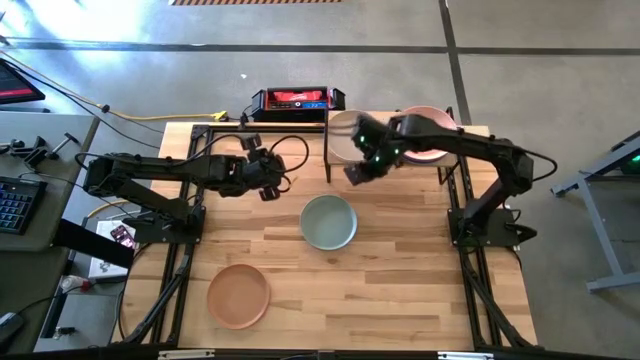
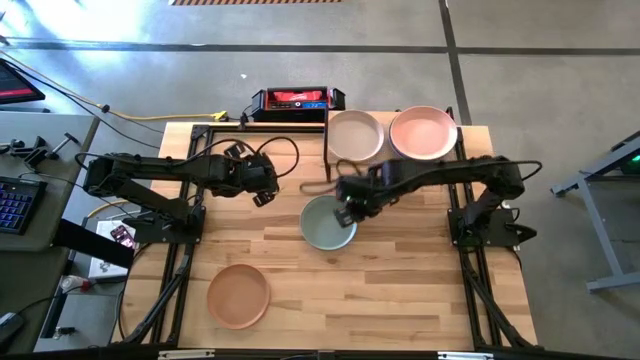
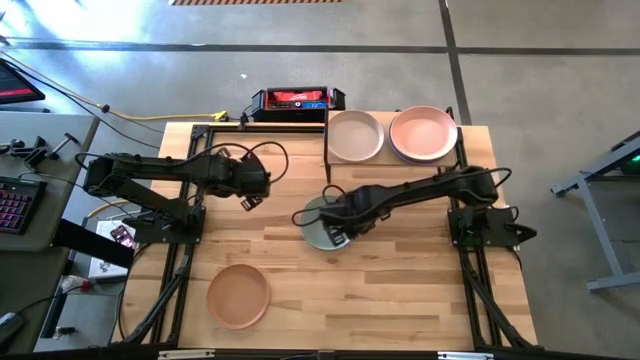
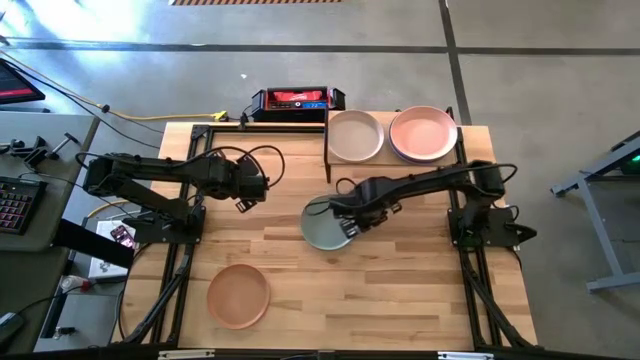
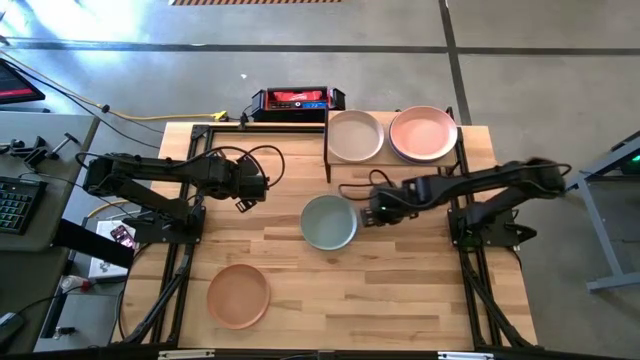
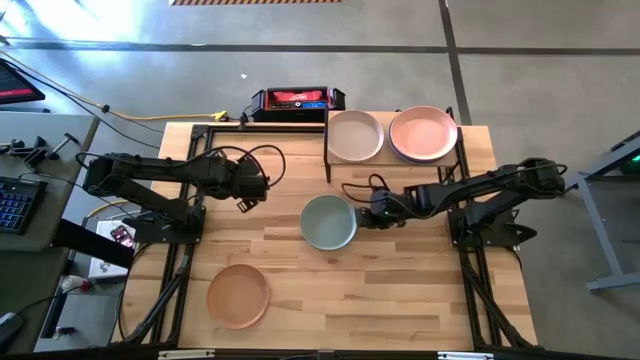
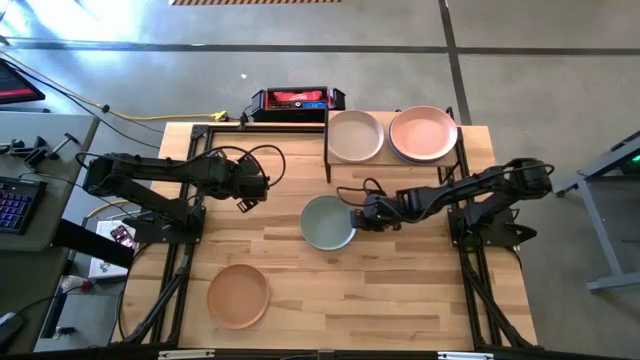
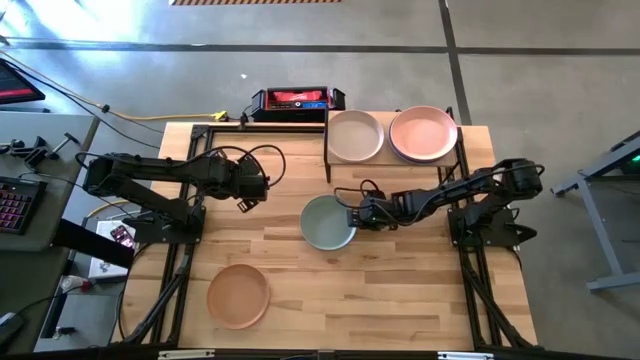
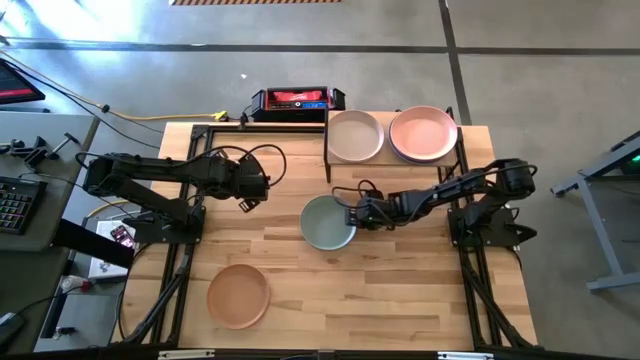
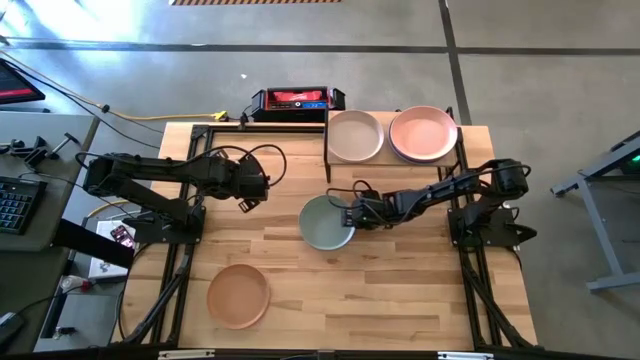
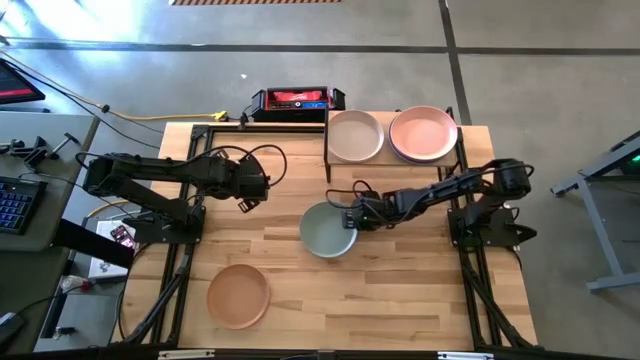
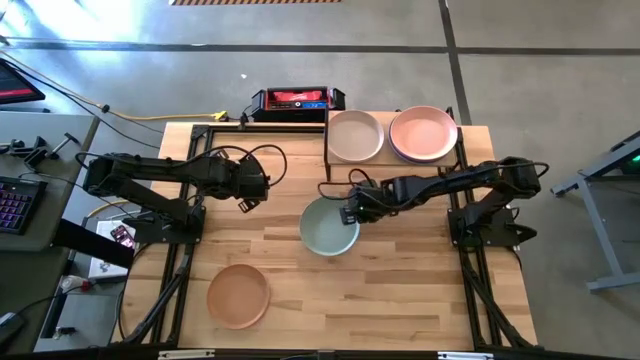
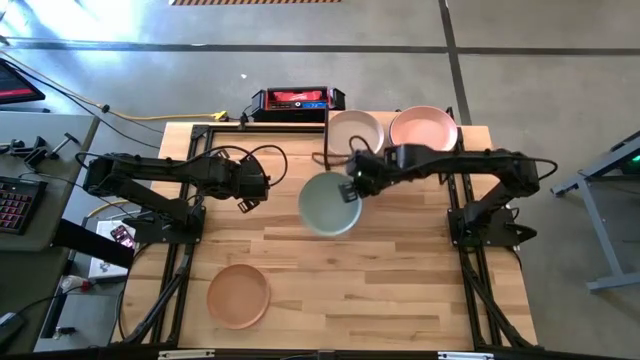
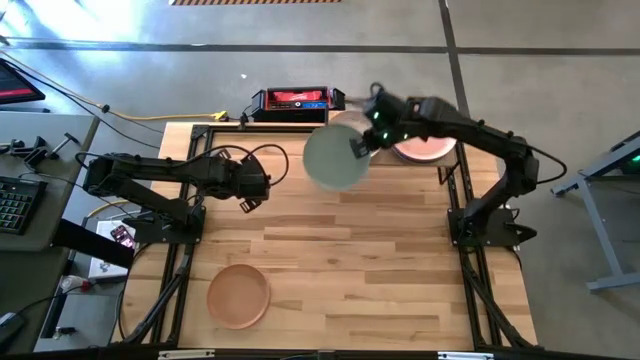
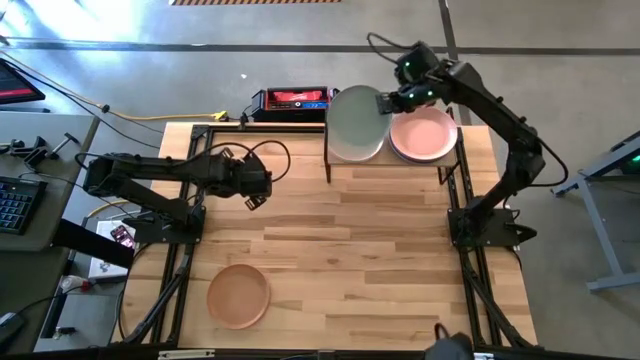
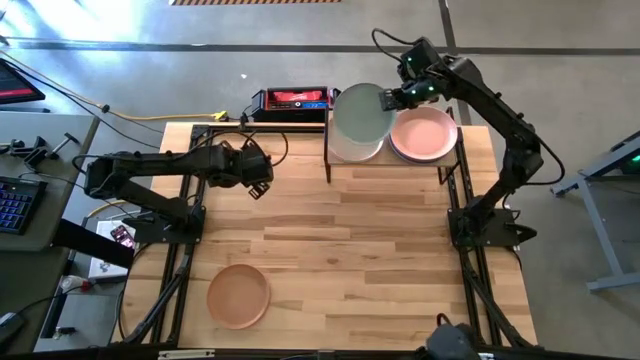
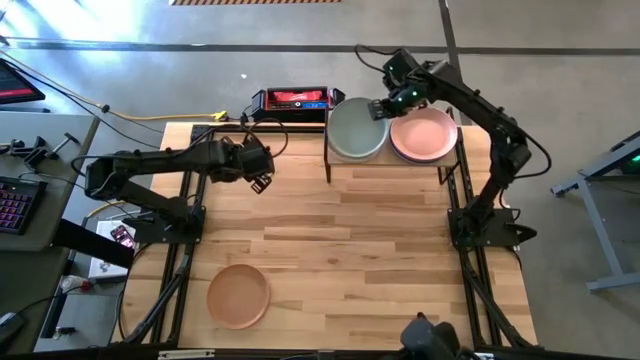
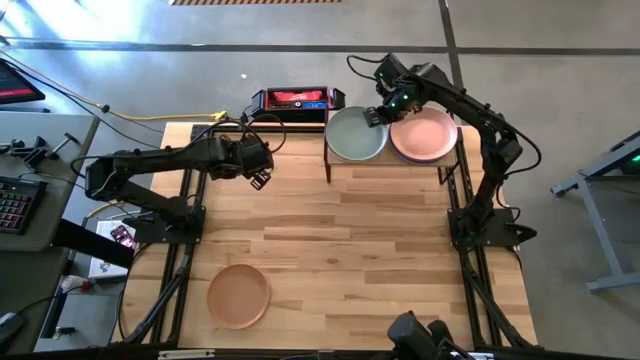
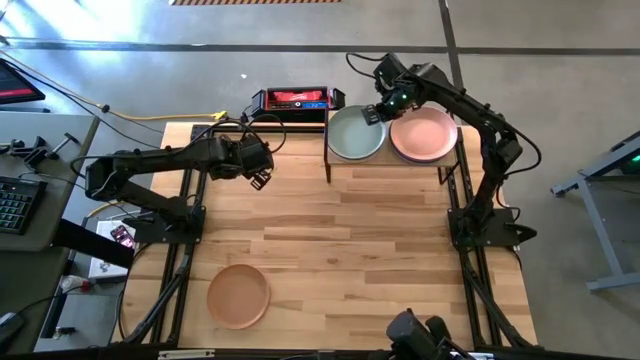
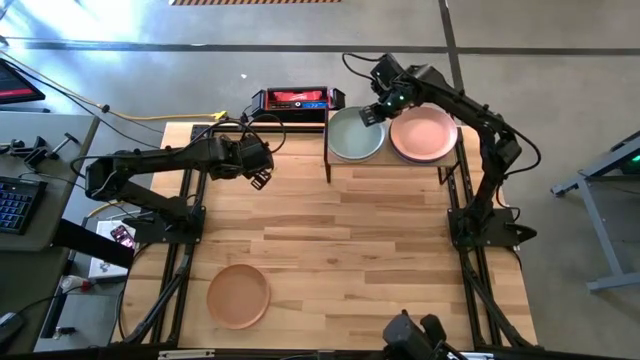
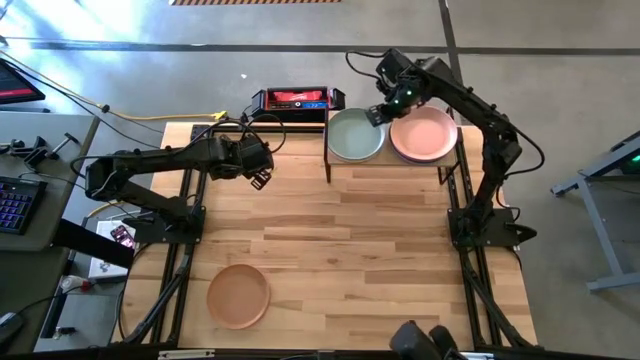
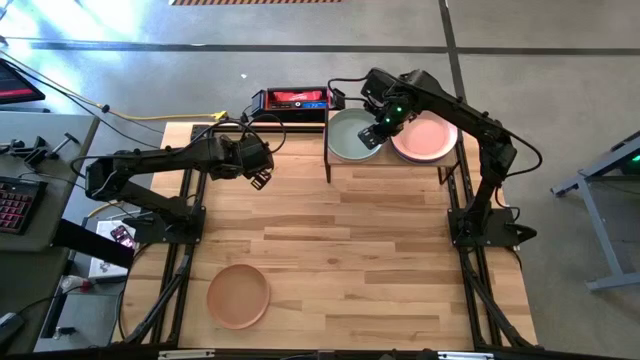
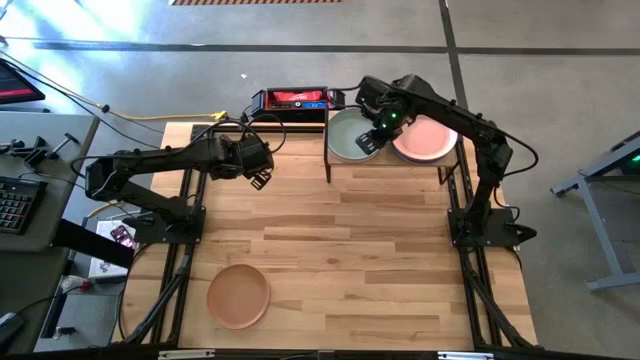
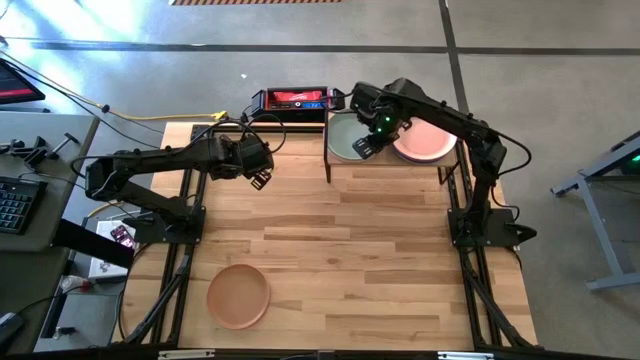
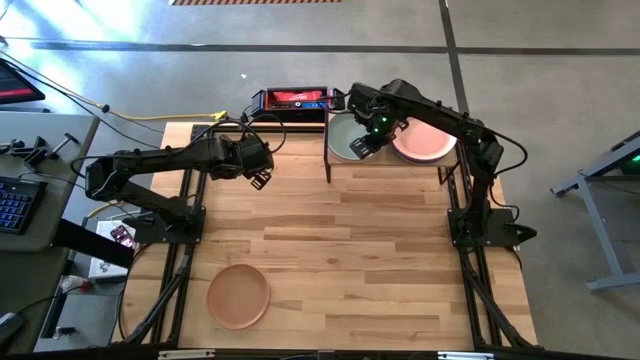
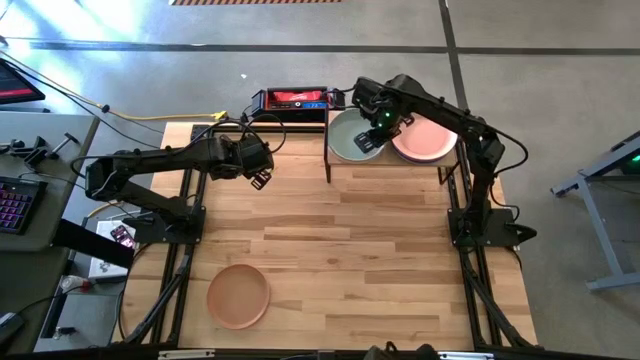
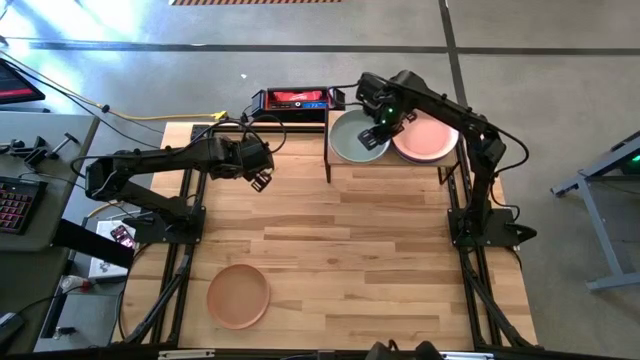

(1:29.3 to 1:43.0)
Task: Place and stack plates onto a shelf
Stack the light blue plate on top of the gray plate on the shelf

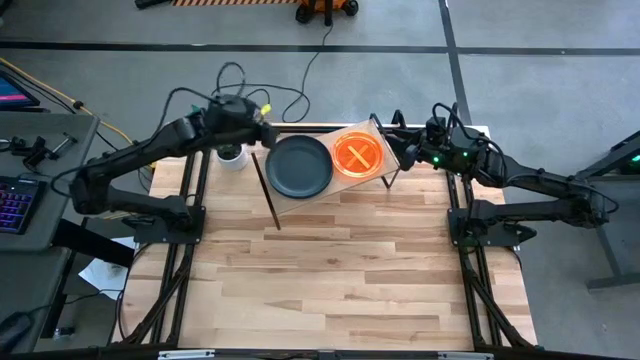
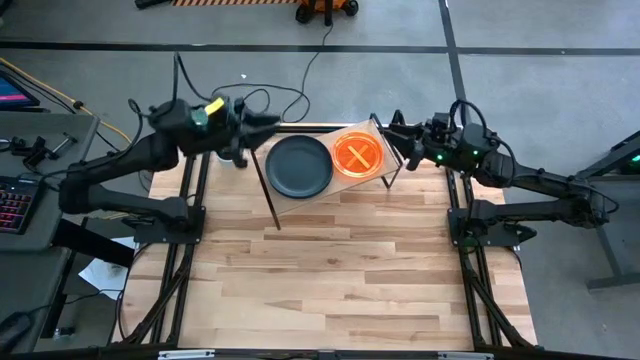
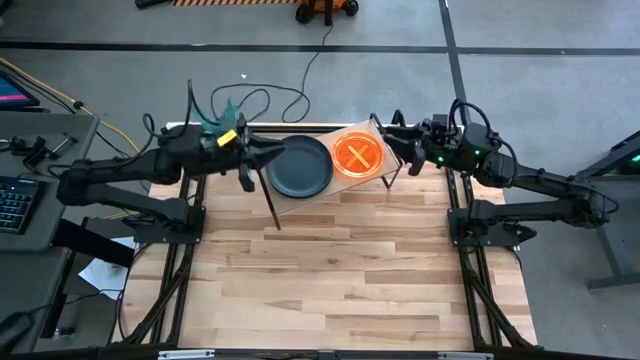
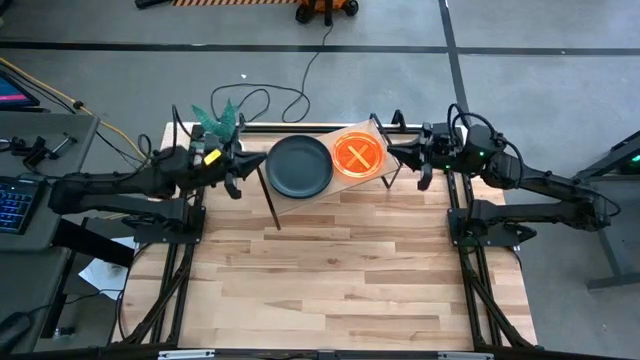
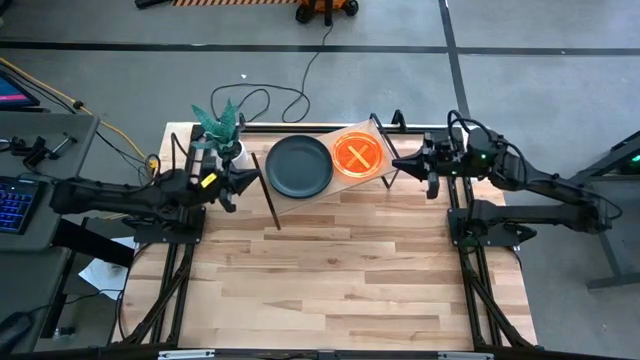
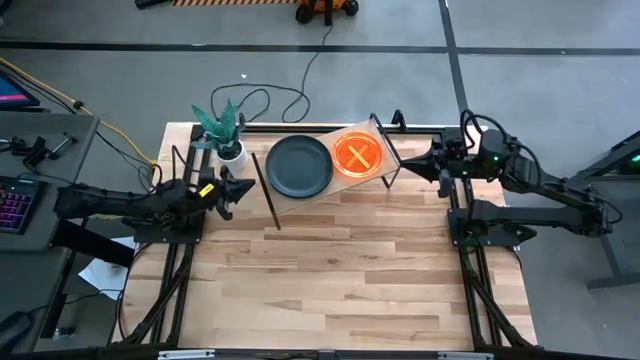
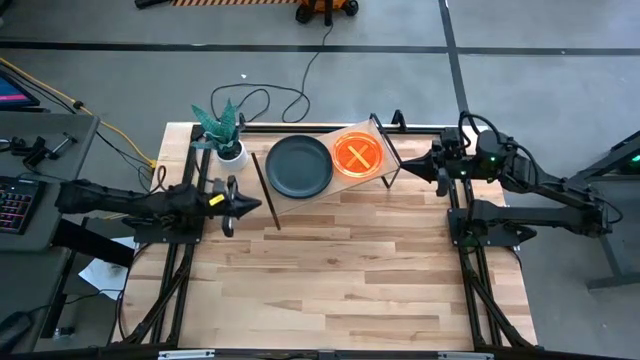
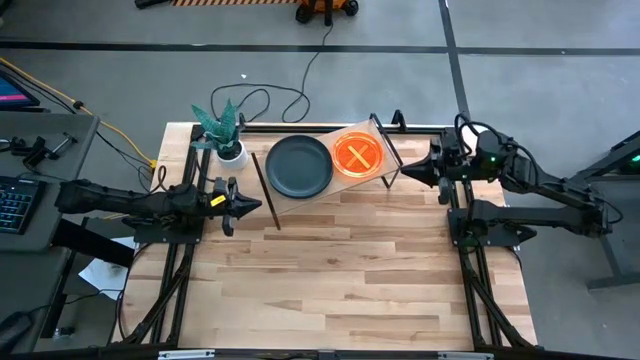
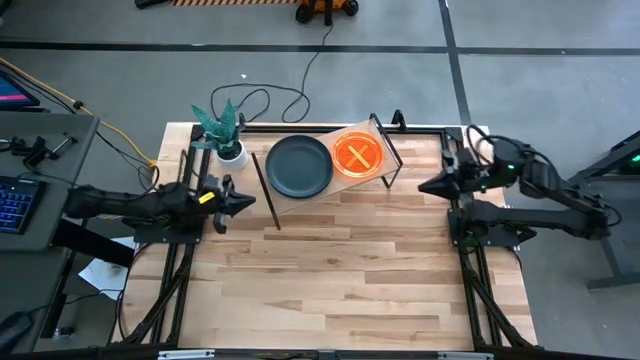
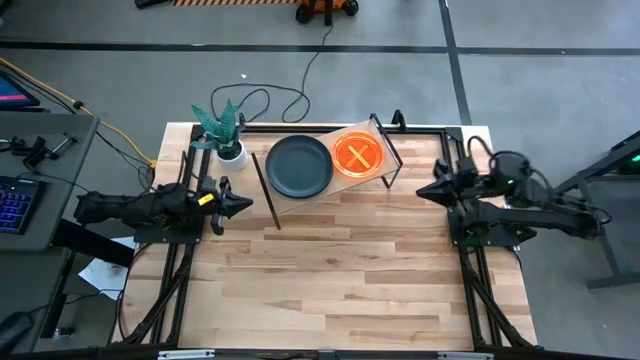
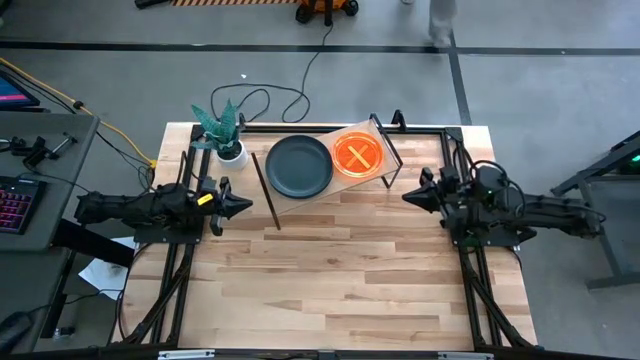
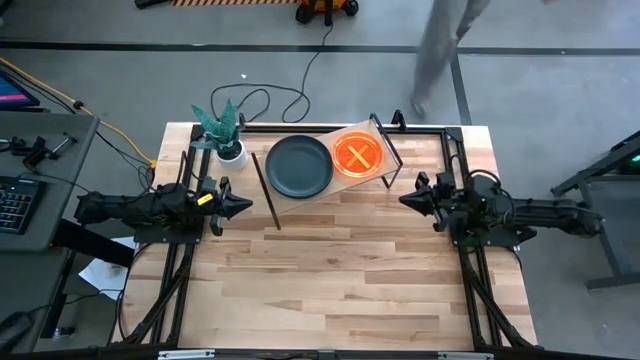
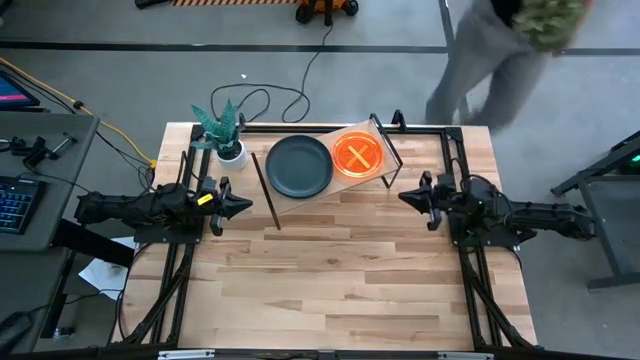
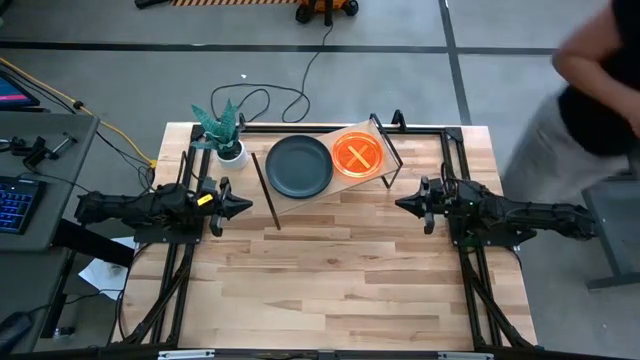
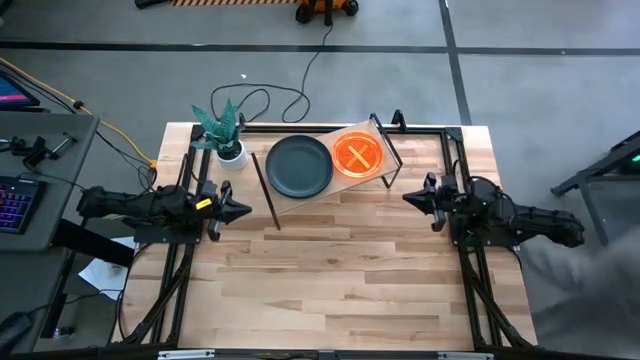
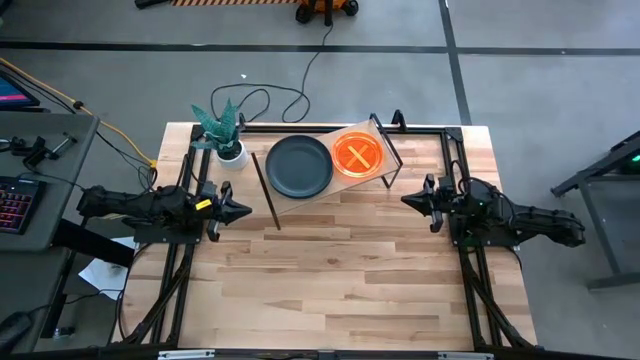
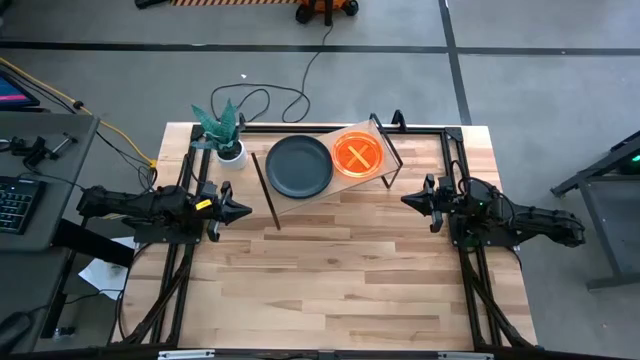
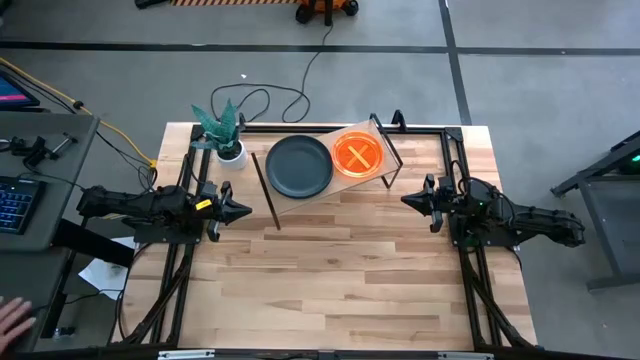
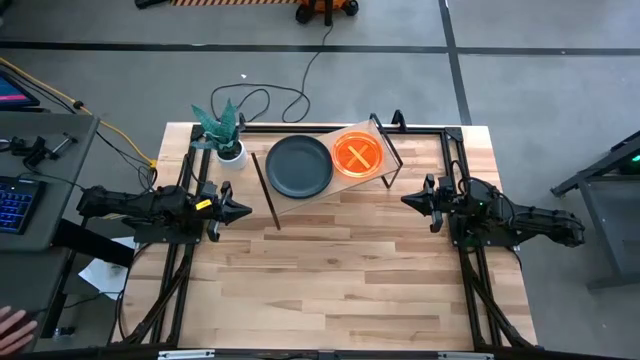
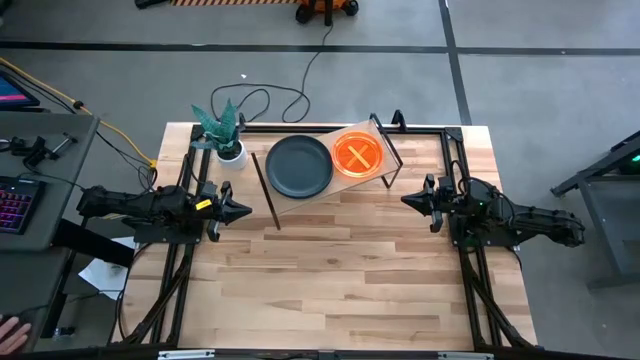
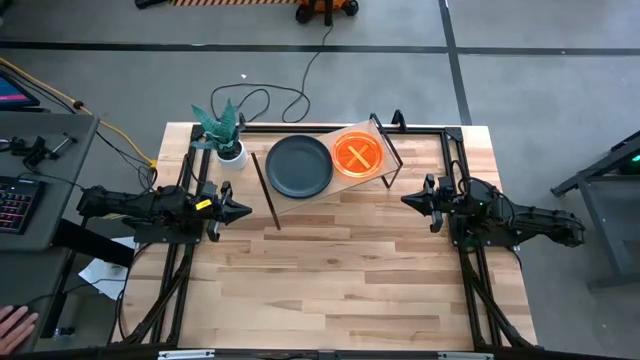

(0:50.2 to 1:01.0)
Task: Place and stack plates onto a shelf
Return to Home Position
